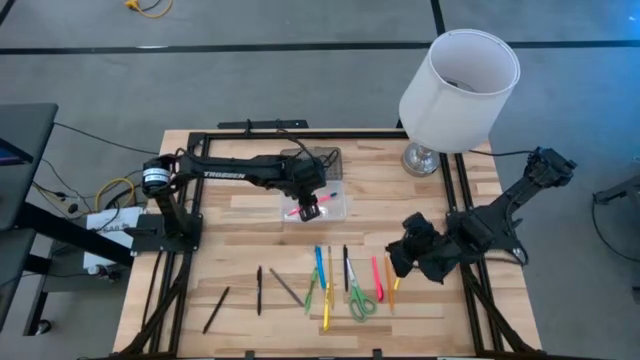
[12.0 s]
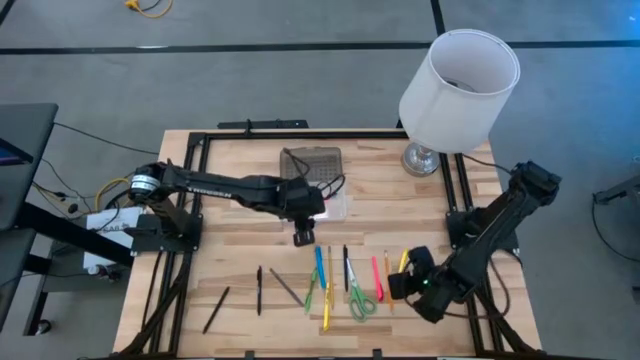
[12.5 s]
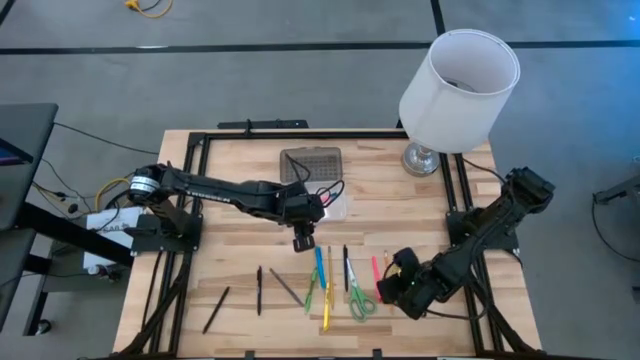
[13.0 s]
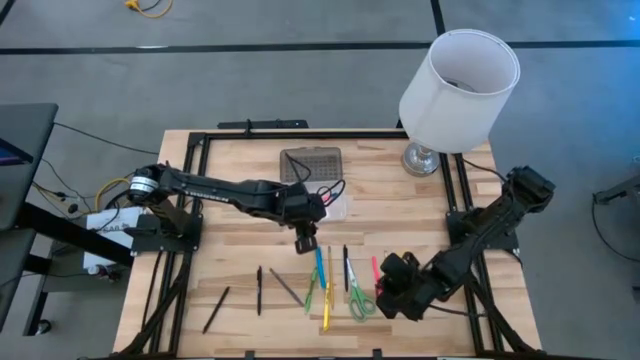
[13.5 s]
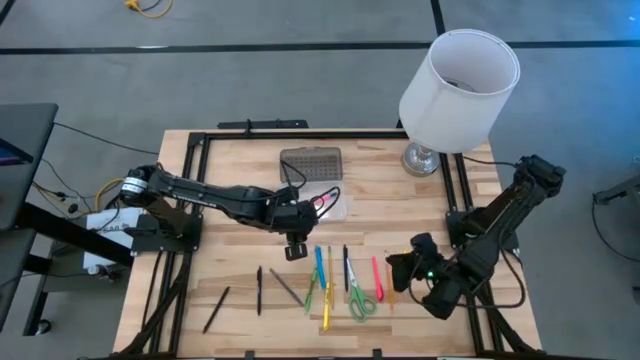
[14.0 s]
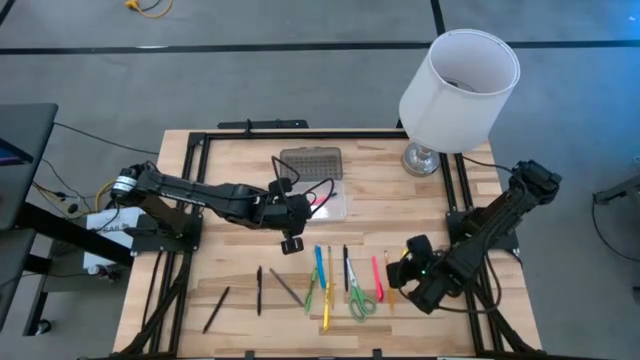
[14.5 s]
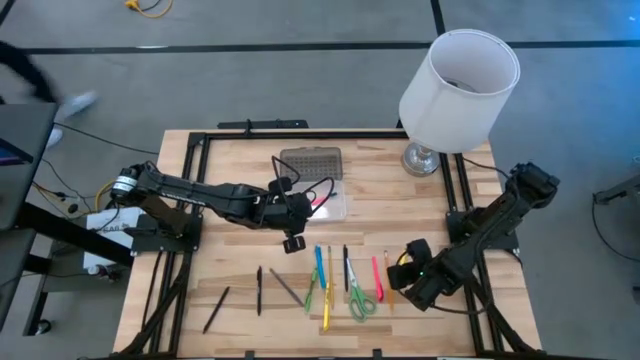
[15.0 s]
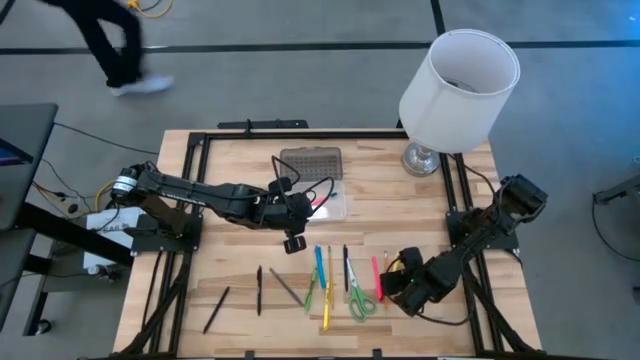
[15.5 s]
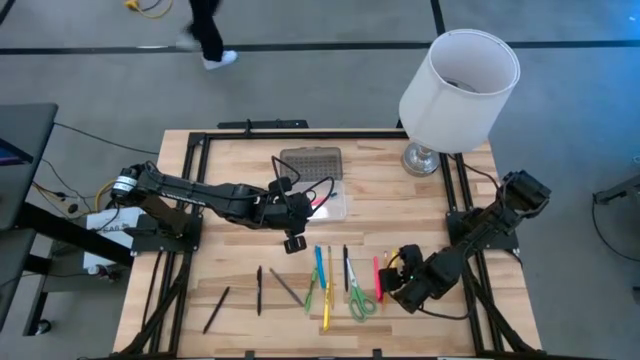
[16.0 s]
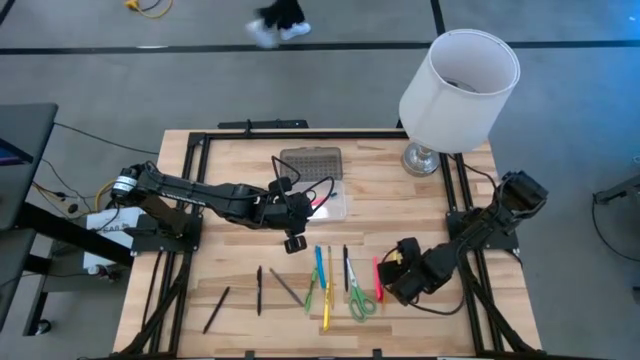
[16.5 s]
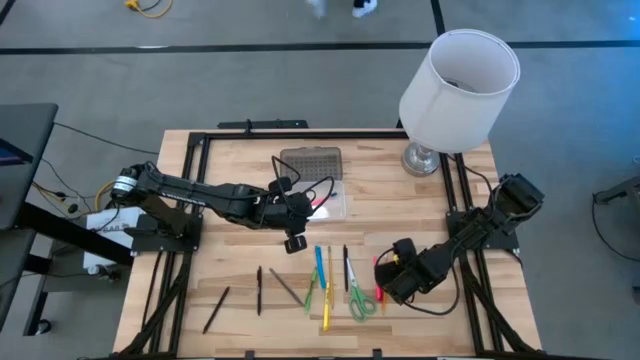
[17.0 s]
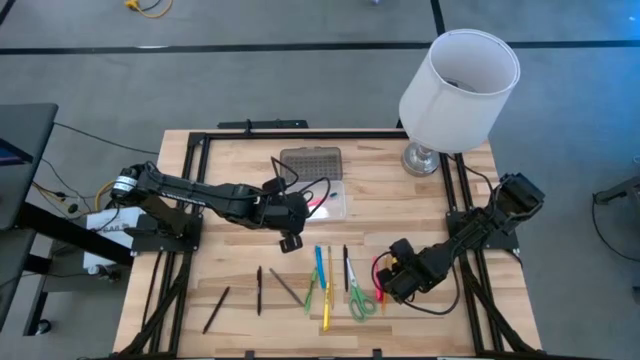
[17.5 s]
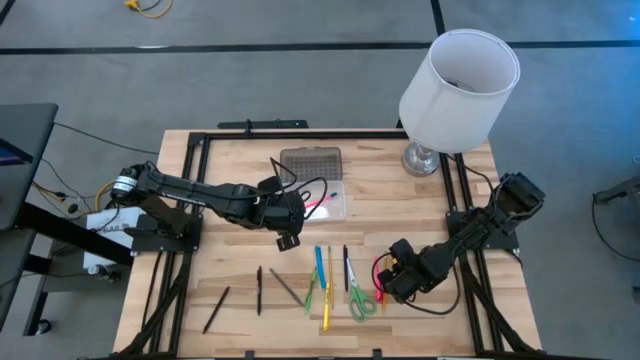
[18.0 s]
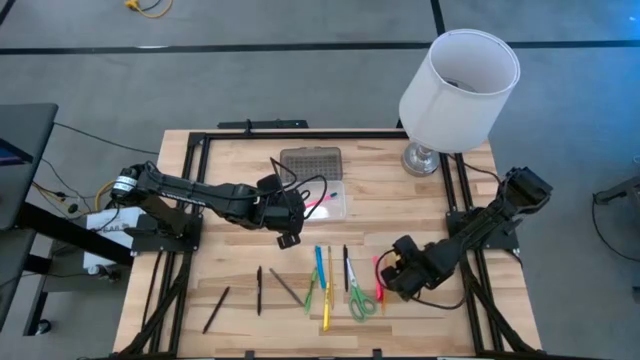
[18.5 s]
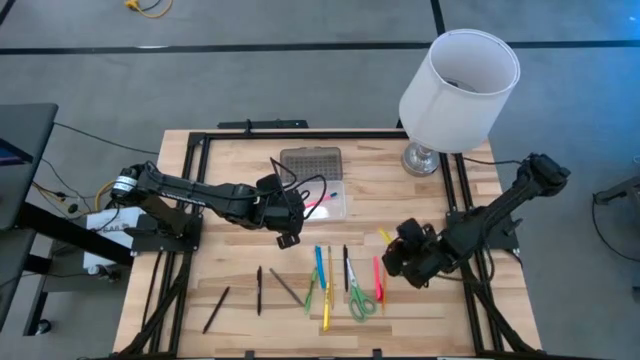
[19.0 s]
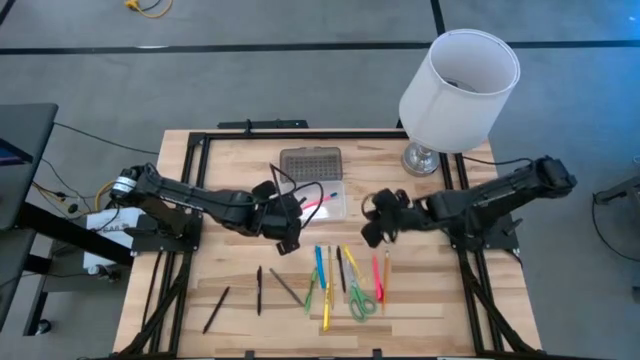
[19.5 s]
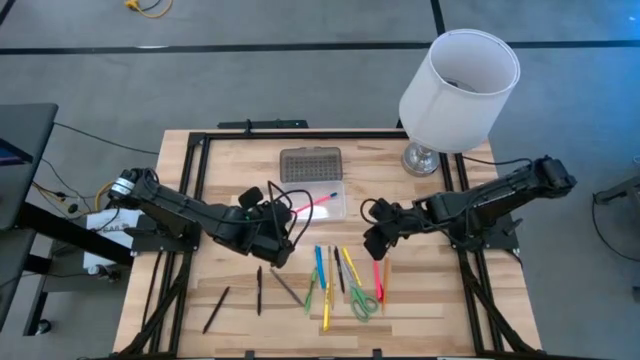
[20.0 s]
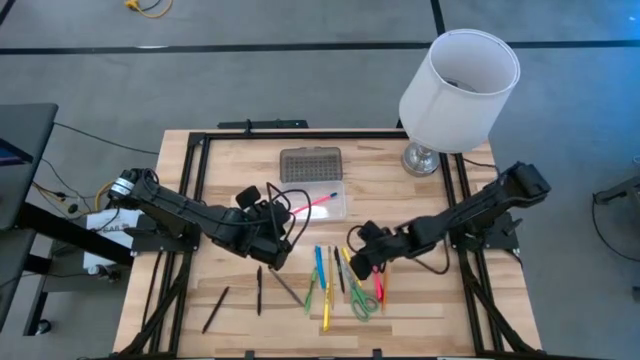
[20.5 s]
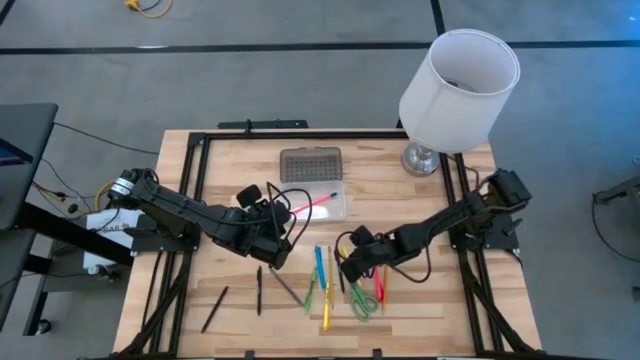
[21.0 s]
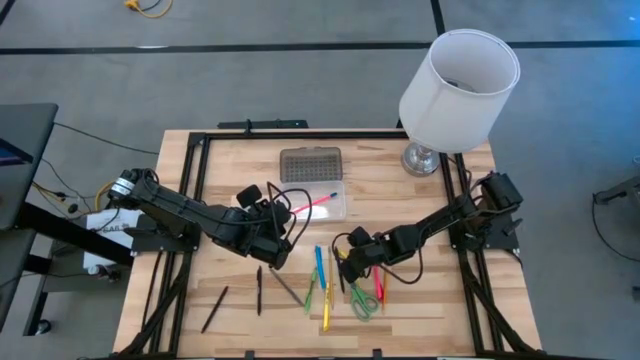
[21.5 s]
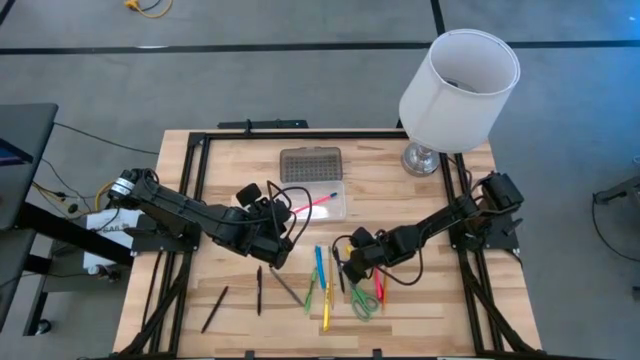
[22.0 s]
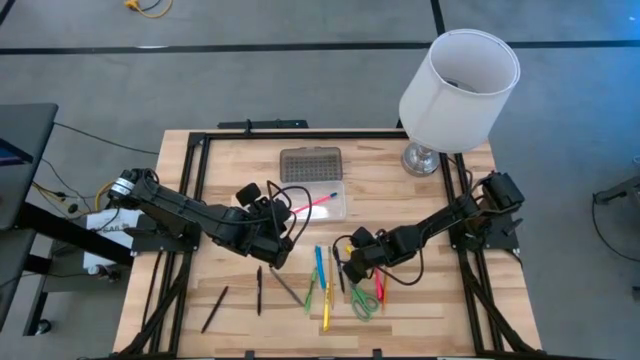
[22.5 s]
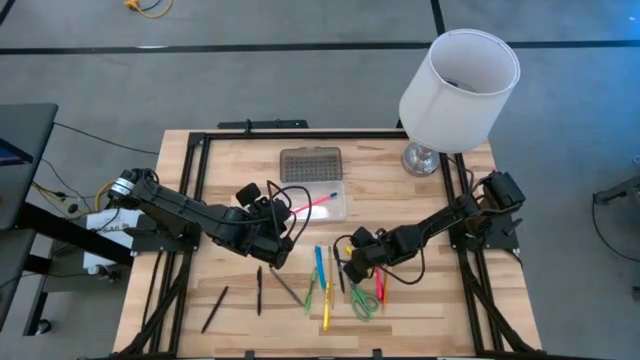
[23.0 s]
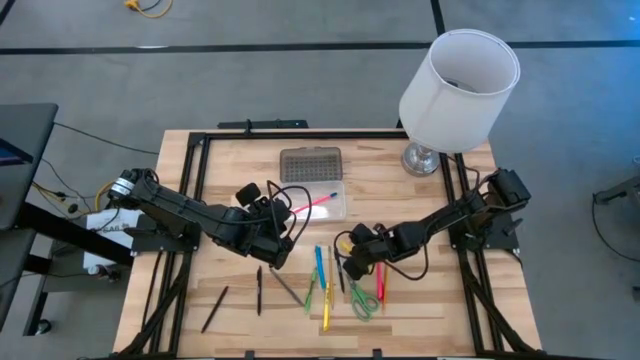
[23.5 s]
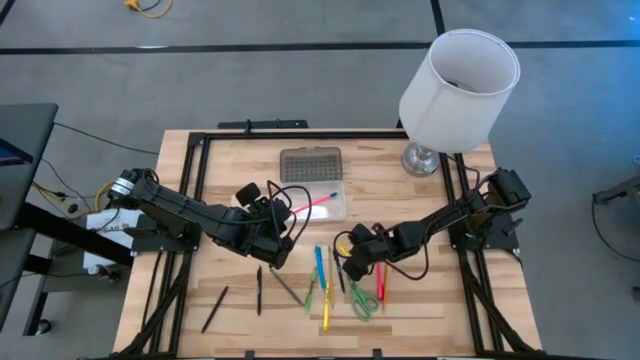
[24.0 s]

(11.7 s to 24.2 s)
Task: Pick & place school supplies into a supply box
Put the right yellow marker pen into the supply box

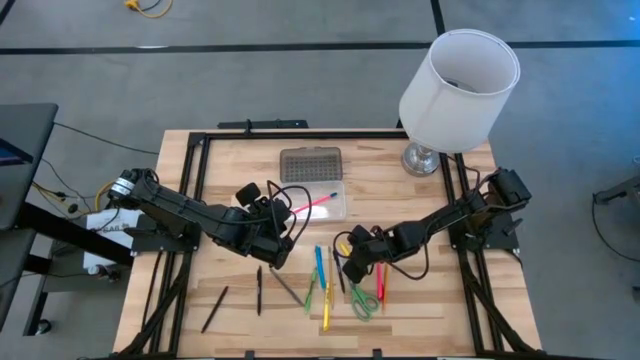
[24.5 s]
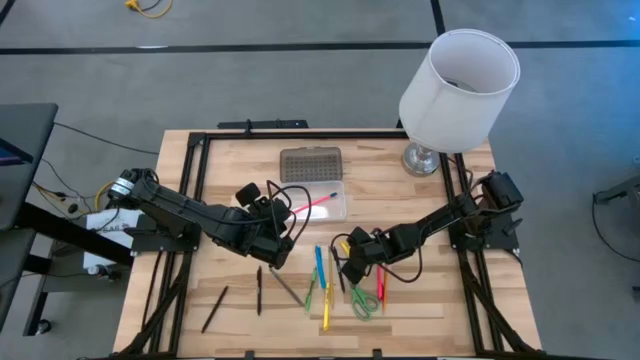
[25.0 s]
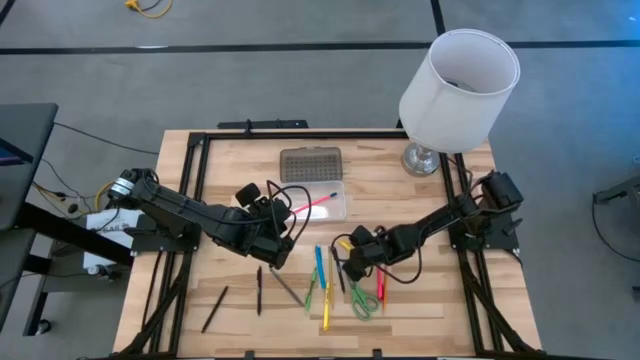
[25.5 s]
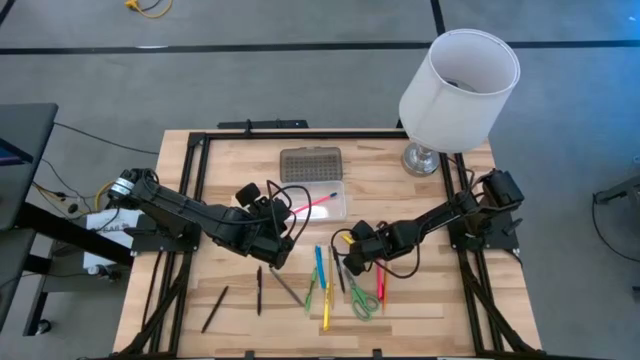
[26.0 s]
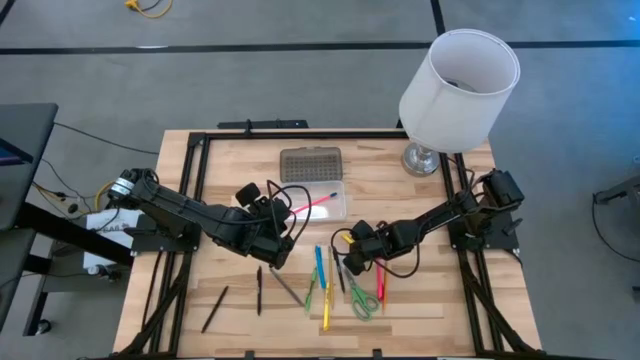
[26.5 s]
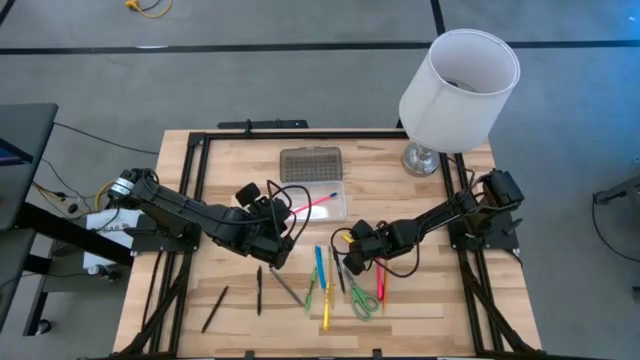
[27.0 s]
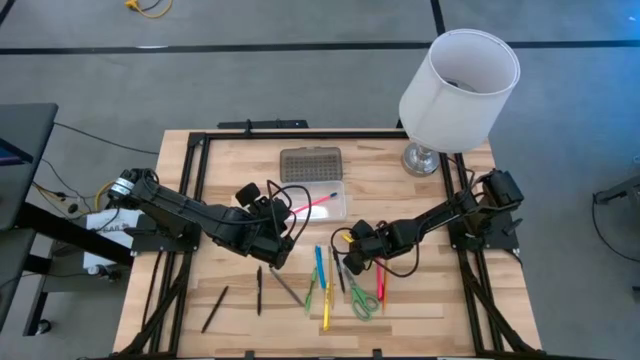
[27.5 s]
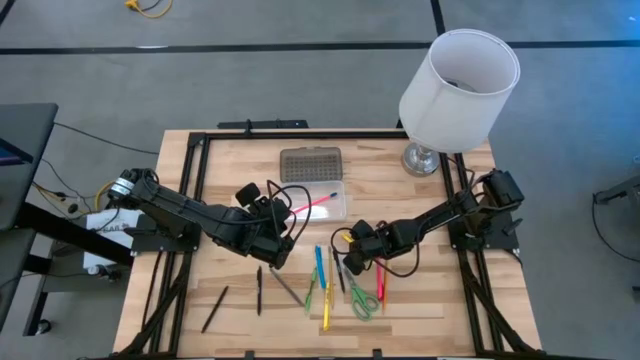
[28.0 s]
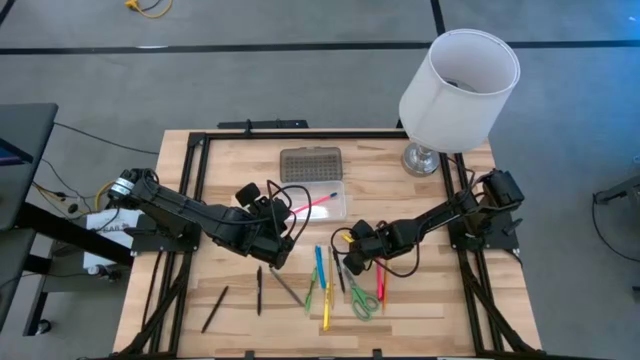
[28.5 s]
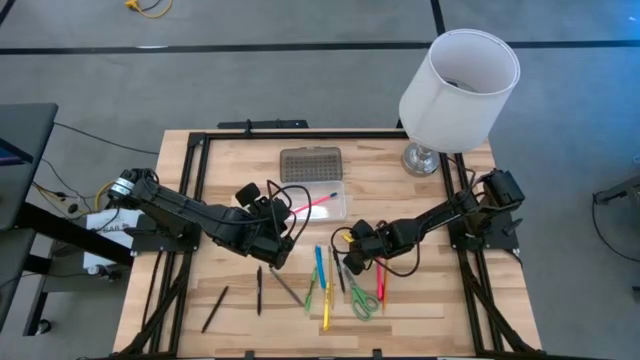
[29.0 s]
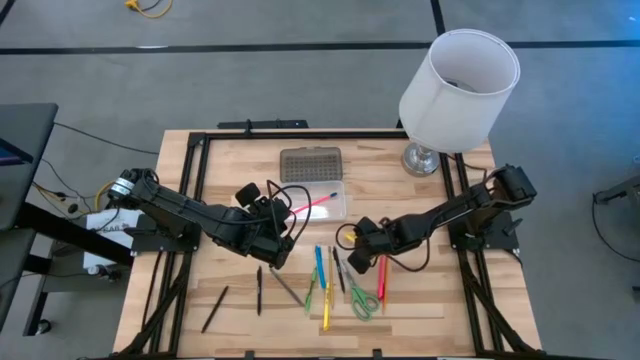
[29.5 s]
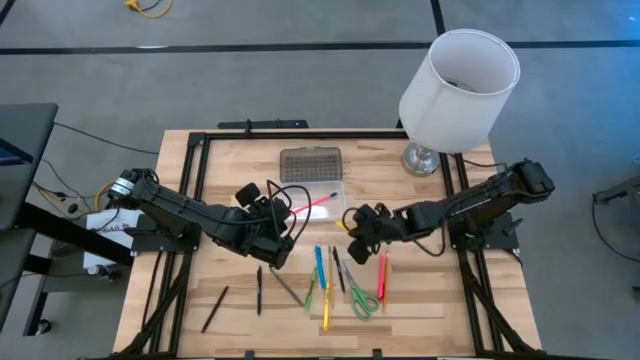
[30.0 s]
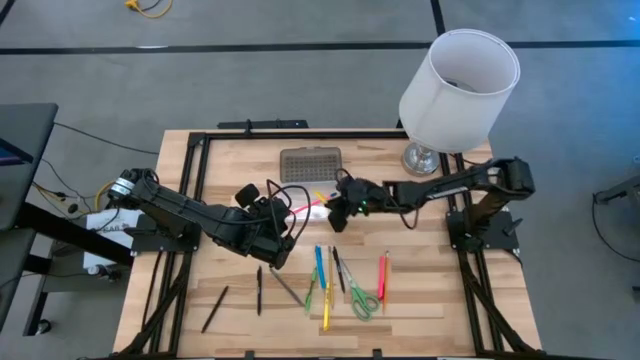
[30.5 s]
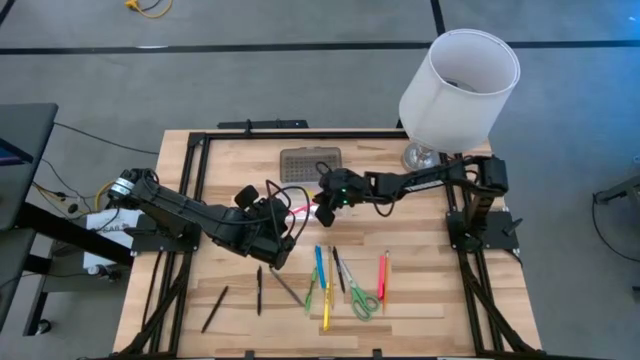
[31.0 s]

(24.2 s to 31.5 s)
Put the yellow pen into the supply box

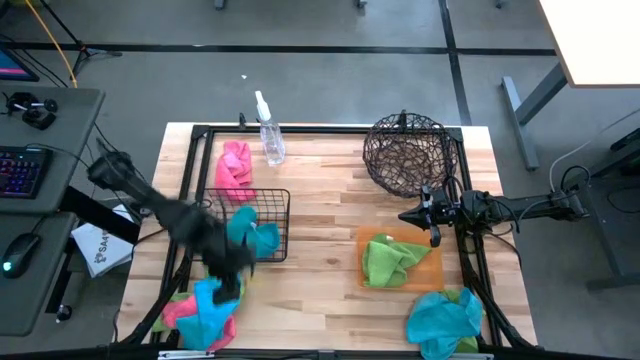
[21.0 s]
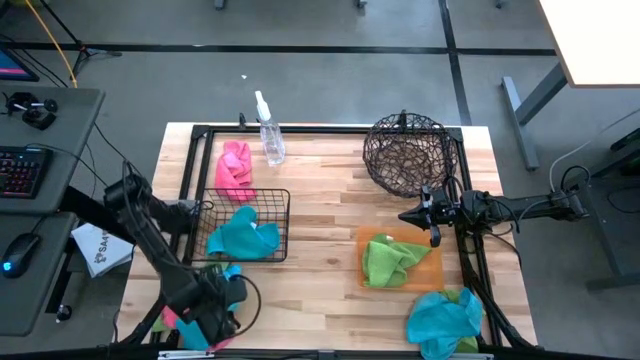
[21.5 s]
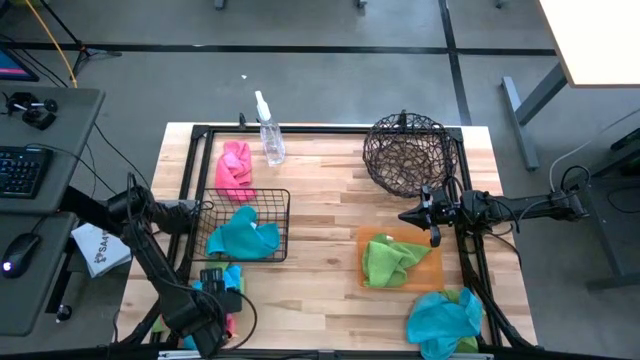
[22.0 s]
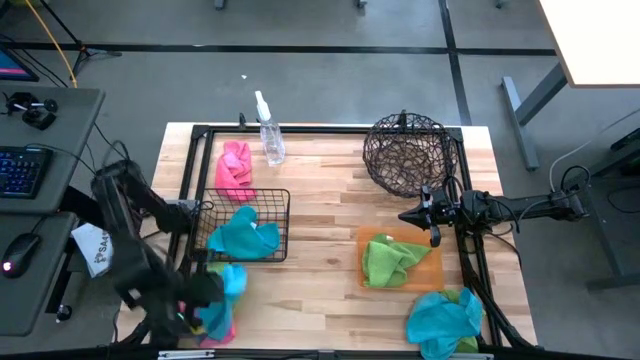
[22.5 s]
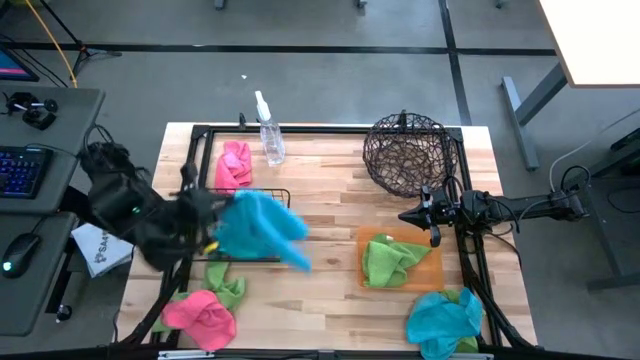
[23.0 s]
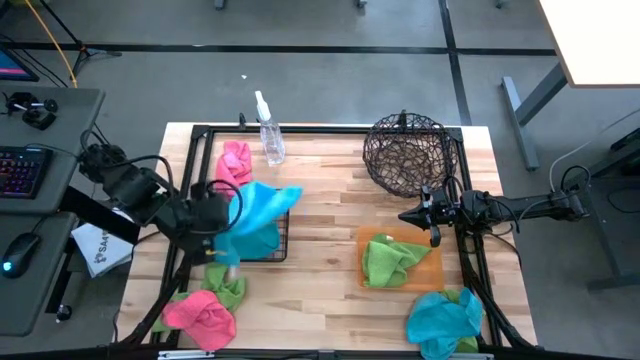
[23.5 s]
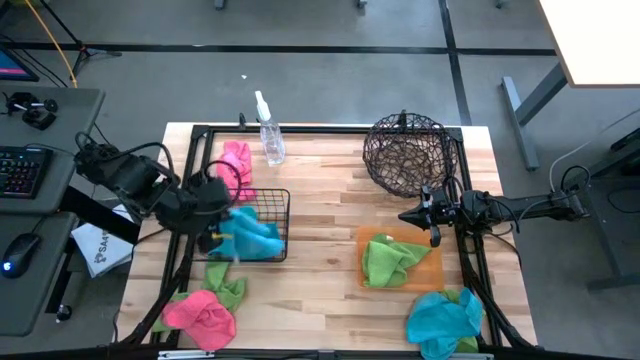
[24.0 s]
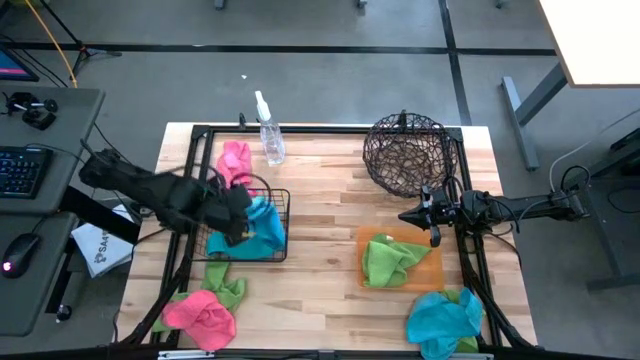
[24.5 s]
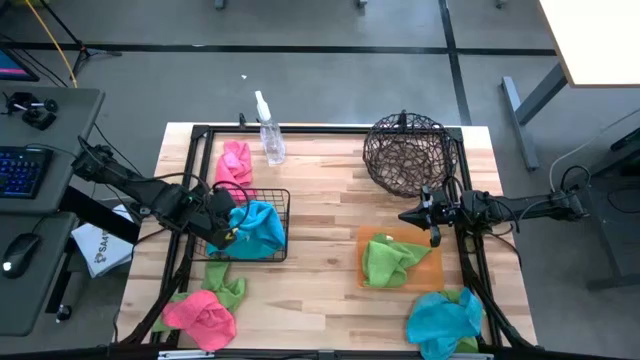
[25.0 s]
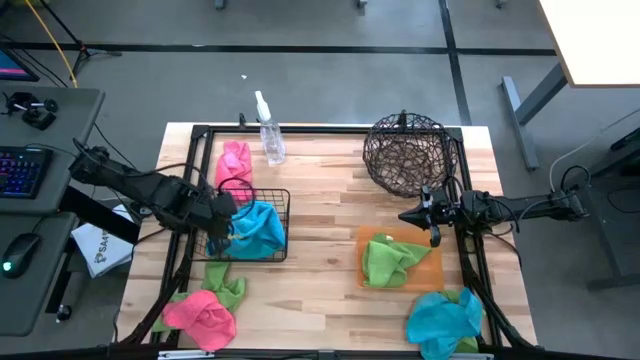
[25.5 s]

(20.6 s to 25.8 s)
Task: Sort microfiber towel by color & place in baskets
Put the left blue microfiber towel into the left wire basket
